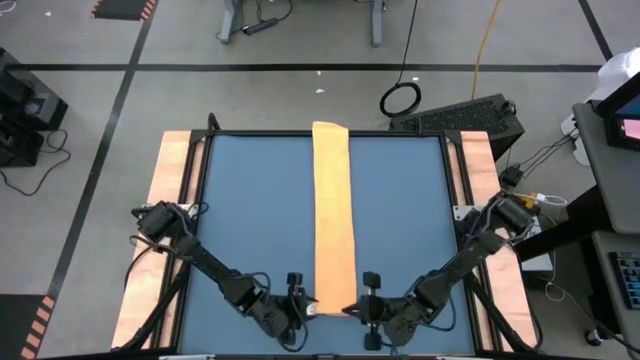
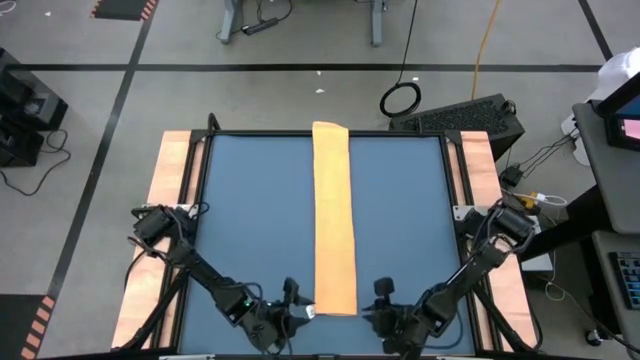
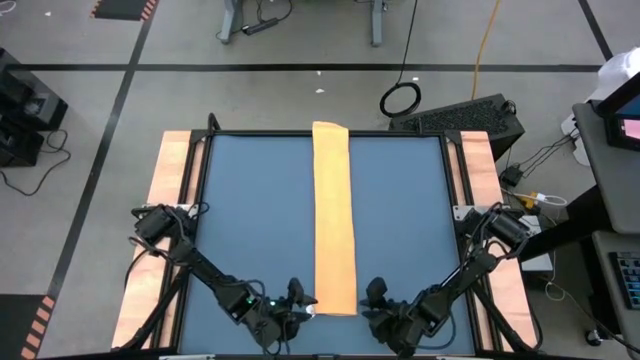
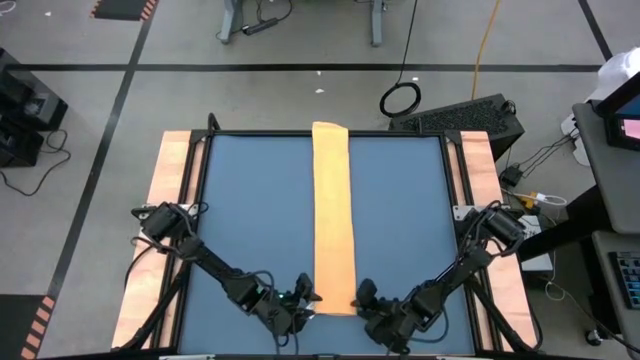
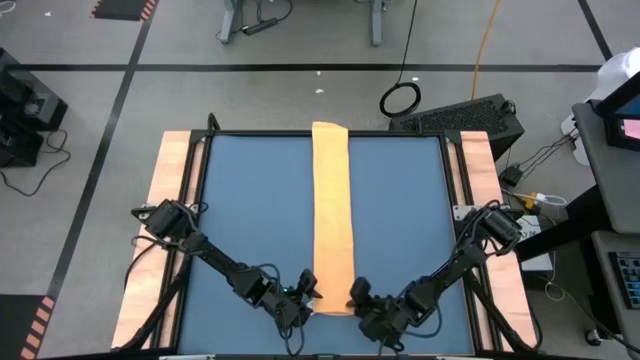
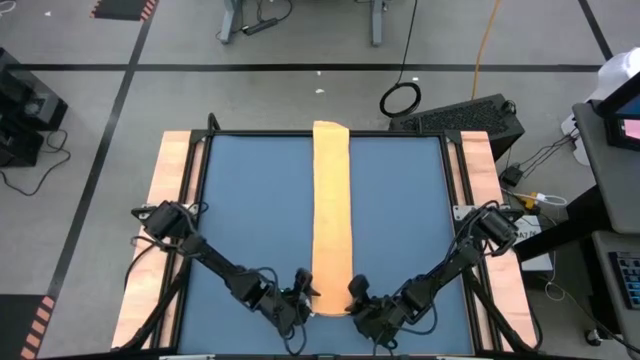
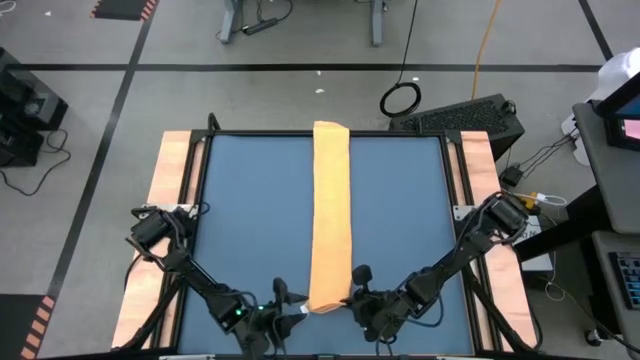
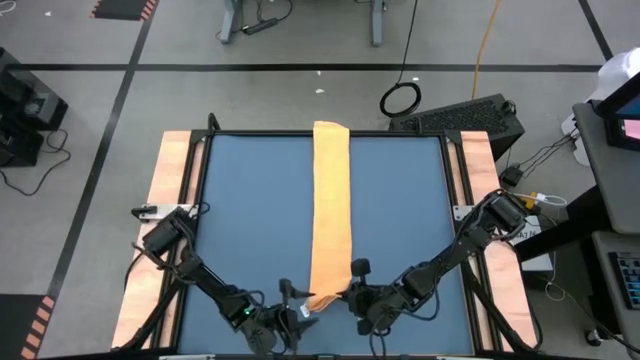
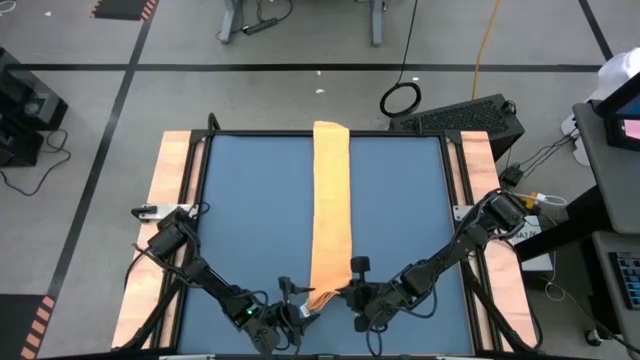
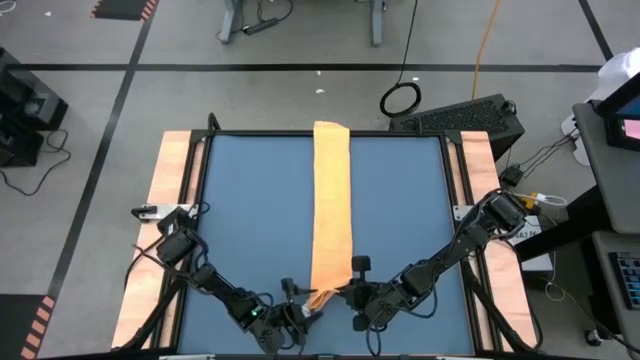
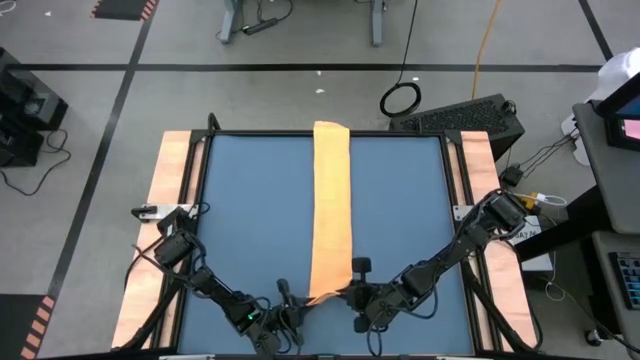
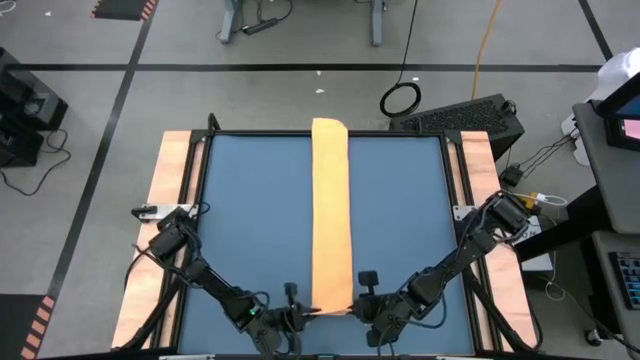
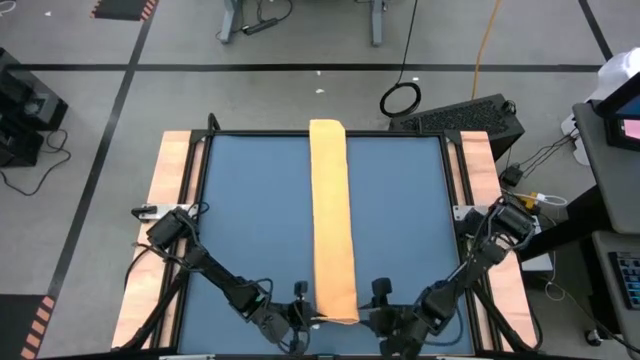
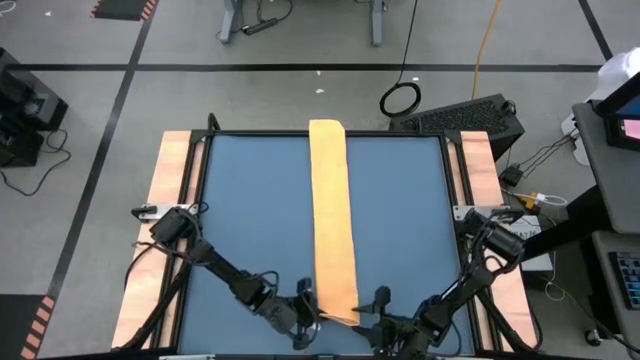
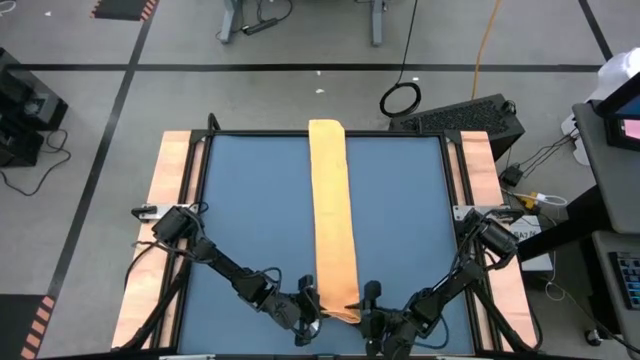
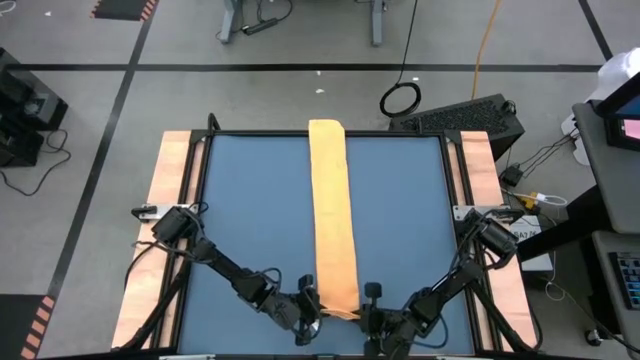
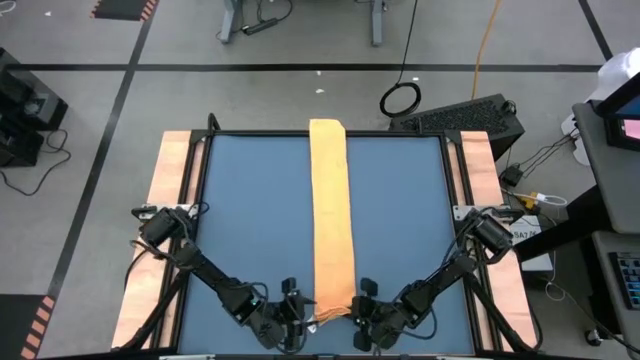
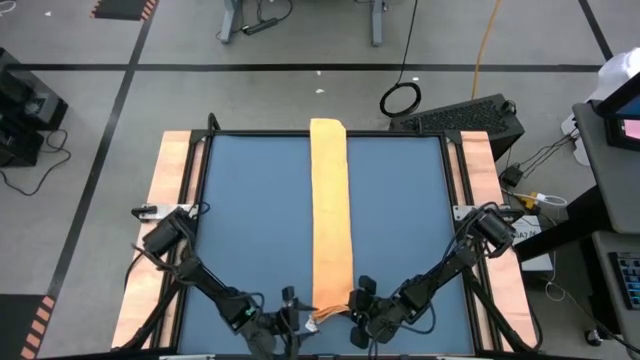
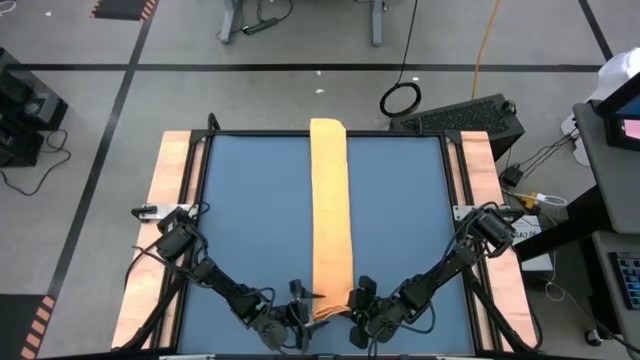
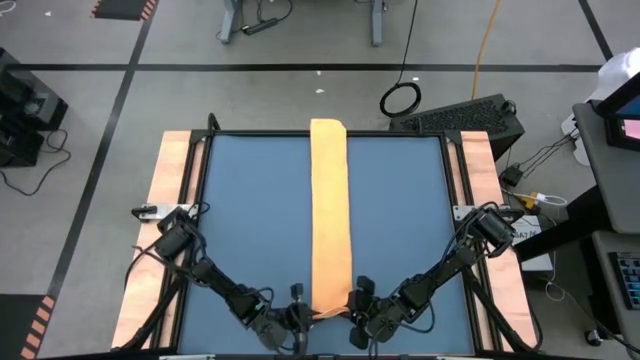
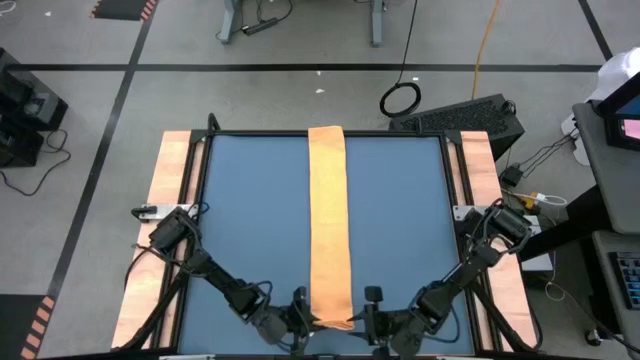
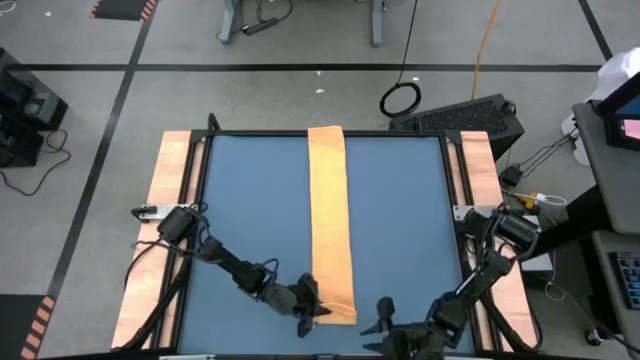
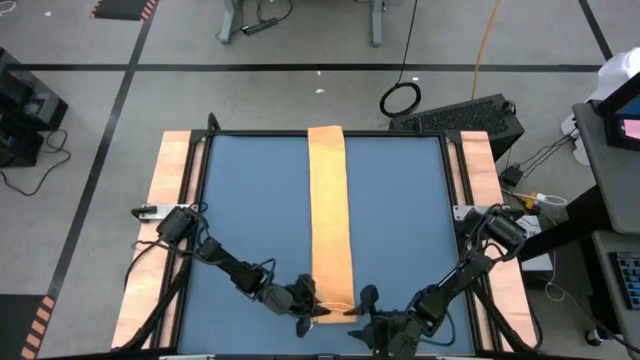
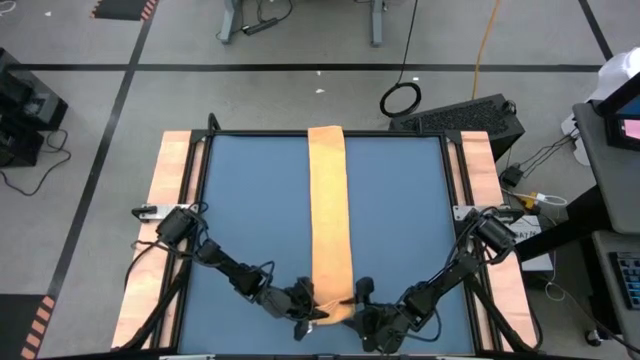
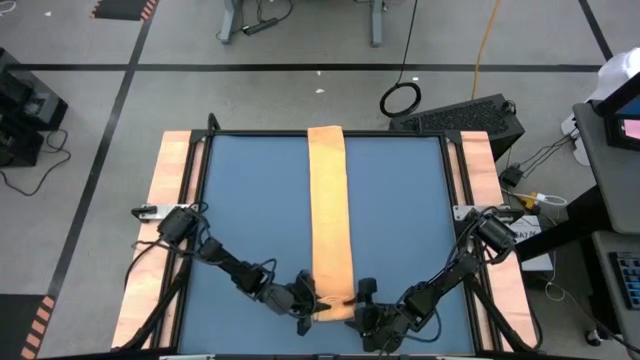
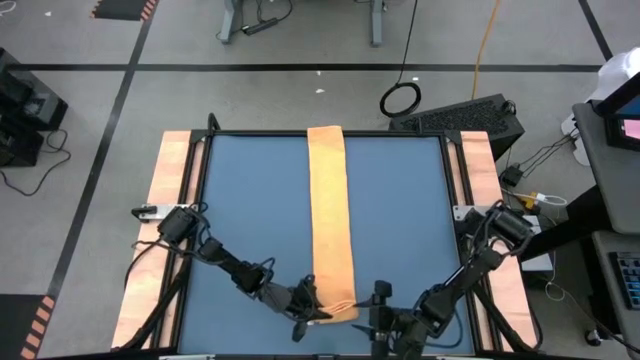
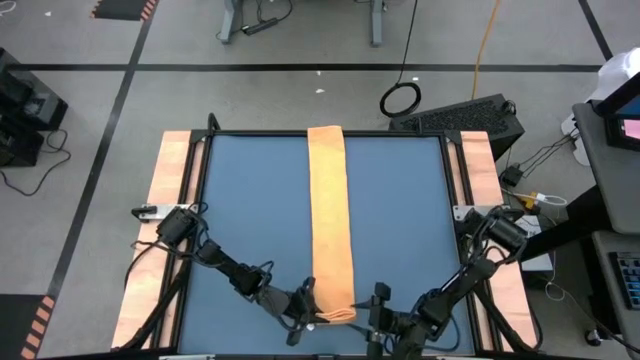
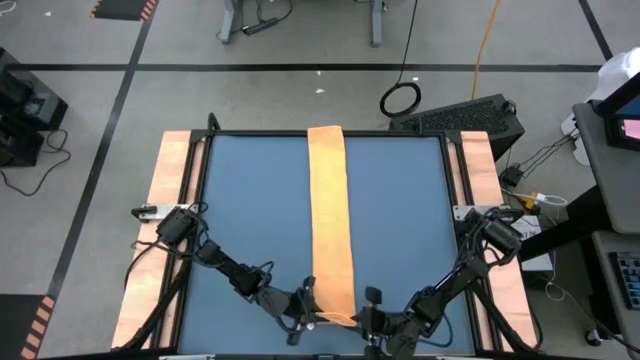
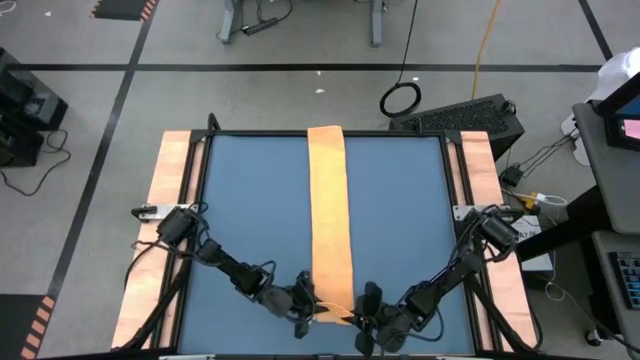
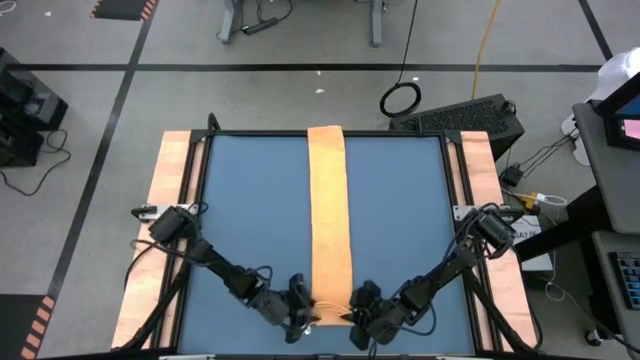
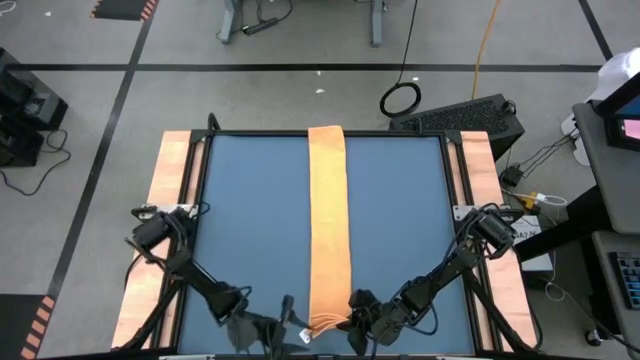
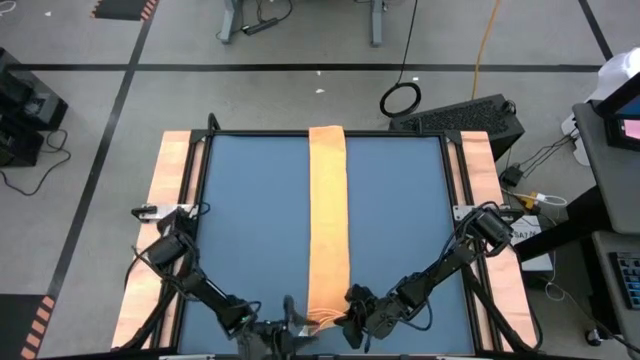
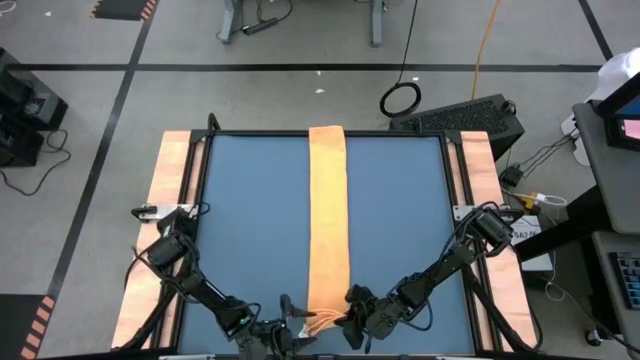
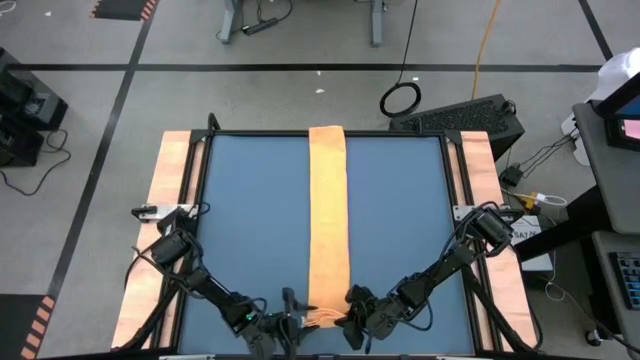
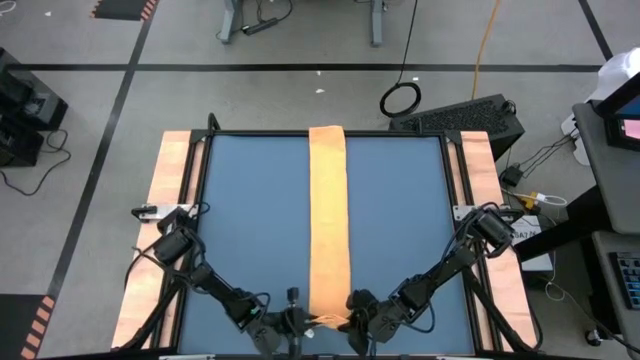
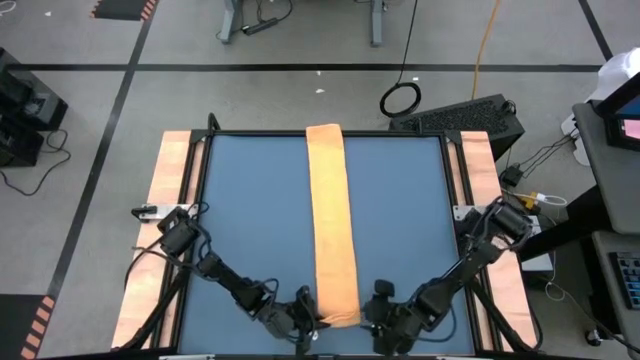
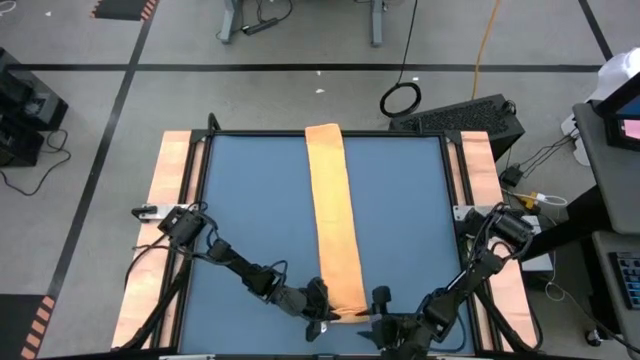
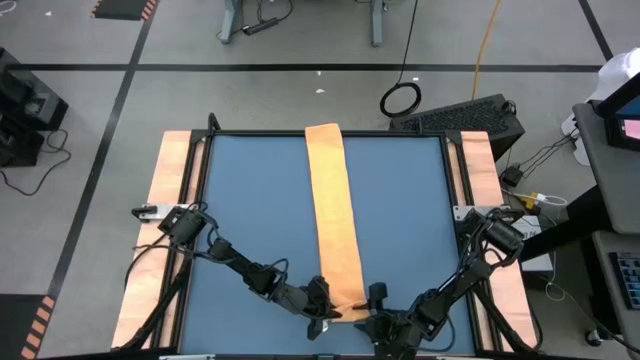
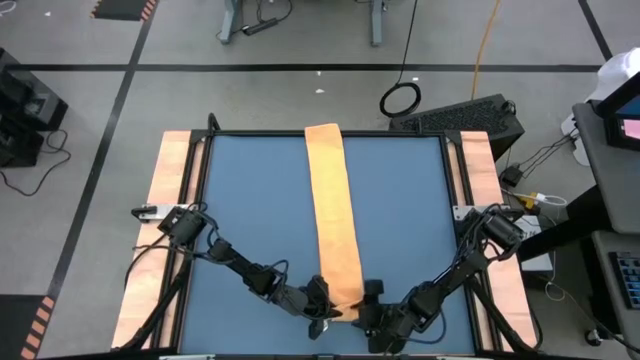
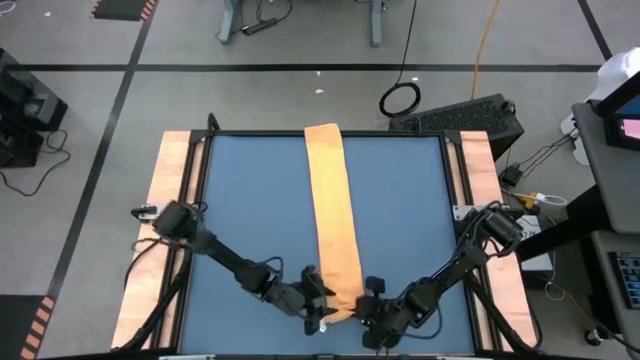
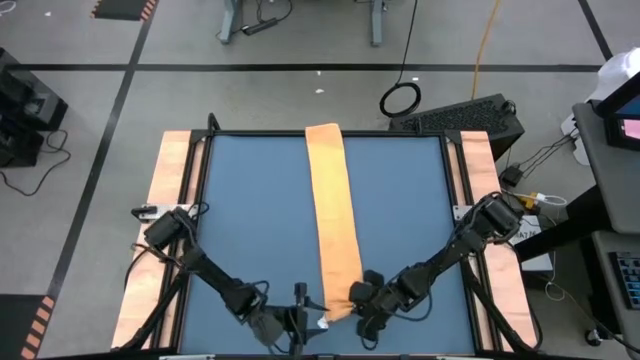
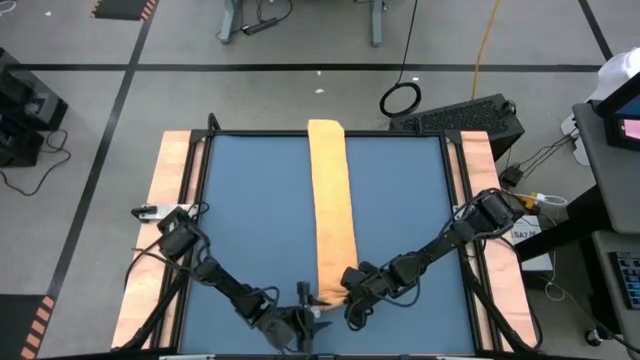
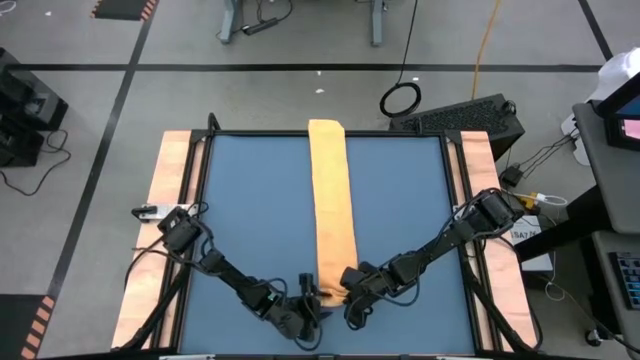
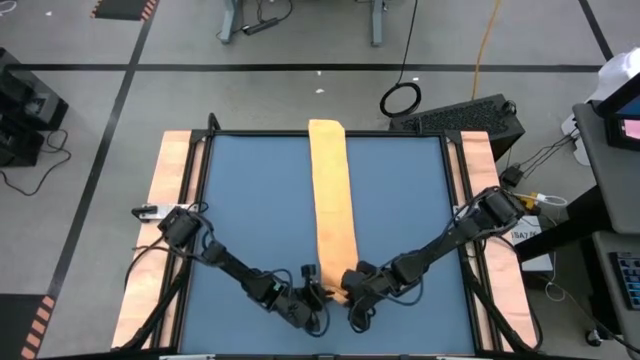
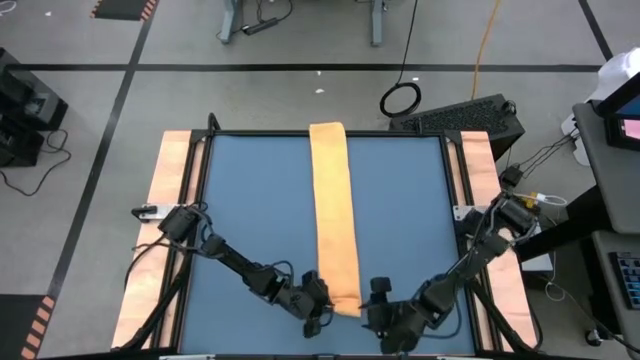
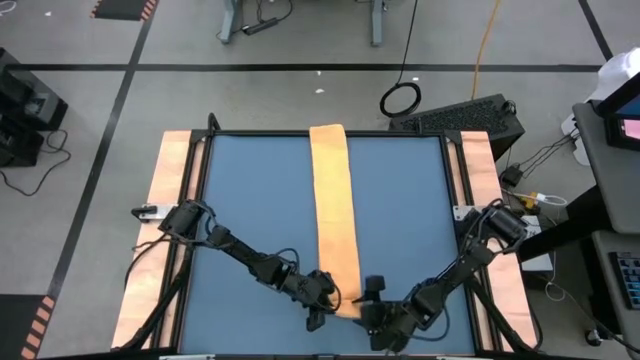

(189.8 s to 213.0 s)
Task: Roll towel into tight, uniform cylinder
Roll the orange microfiber cloth
